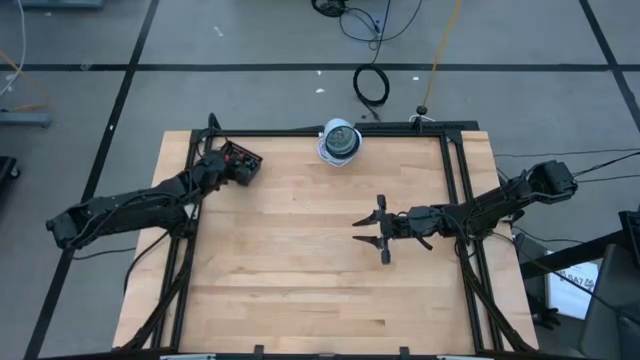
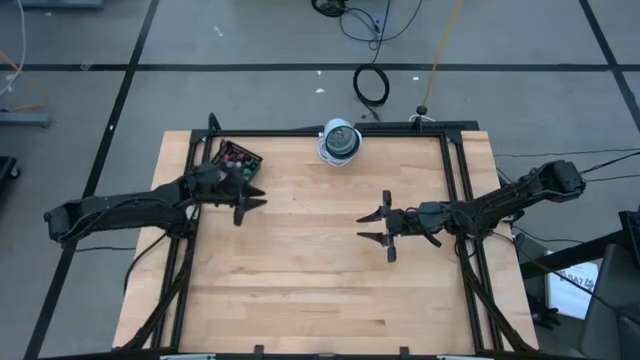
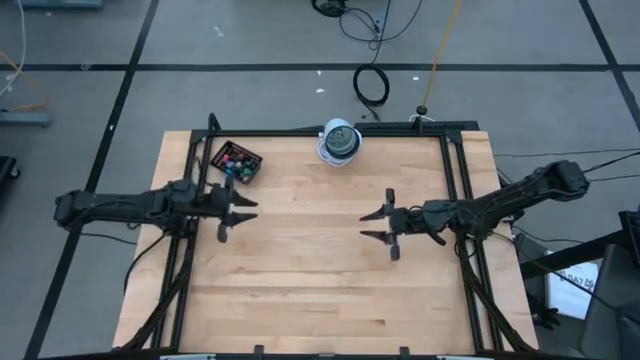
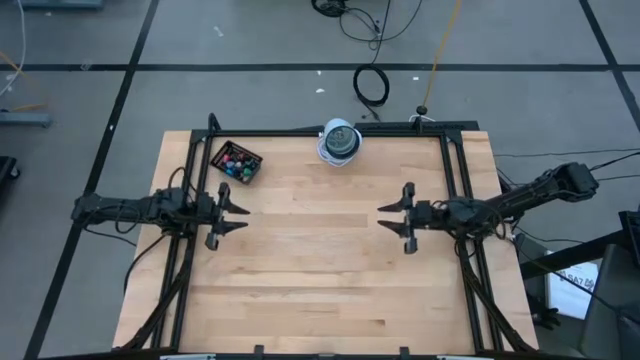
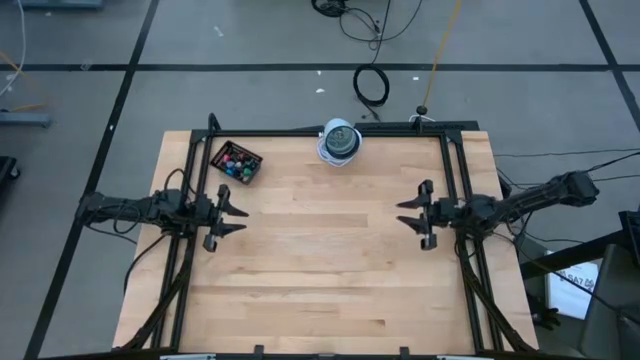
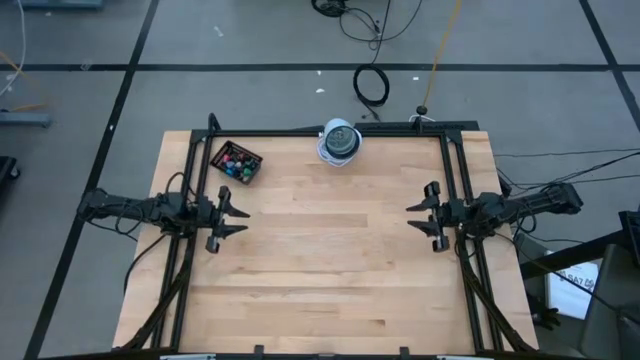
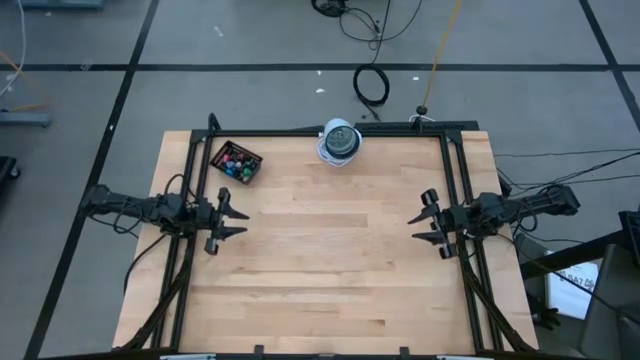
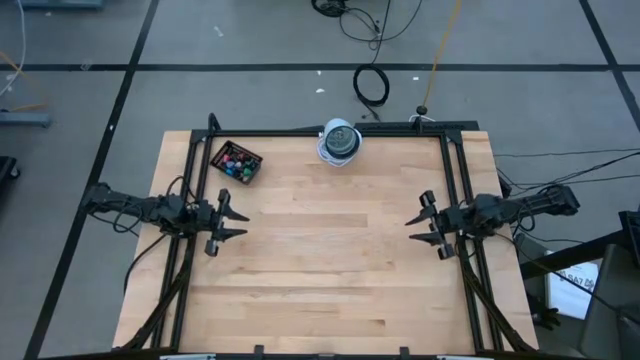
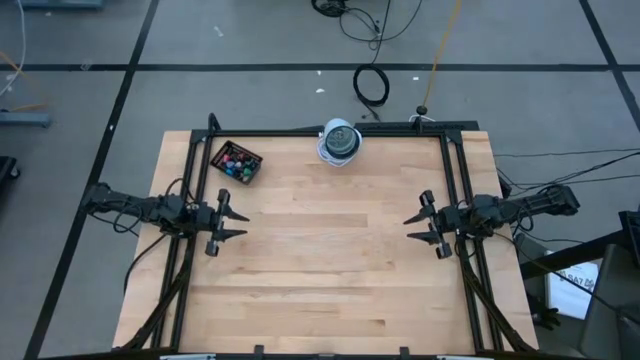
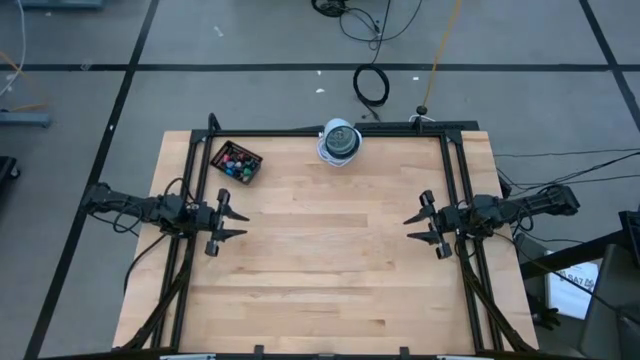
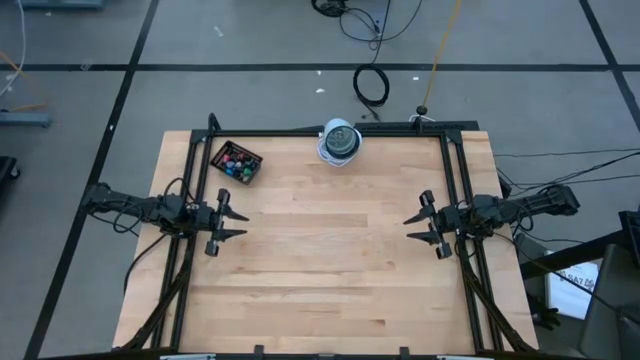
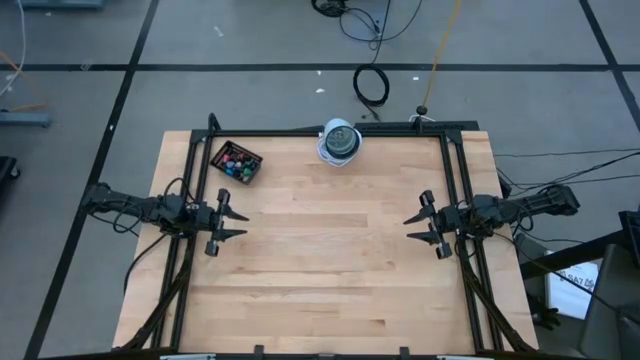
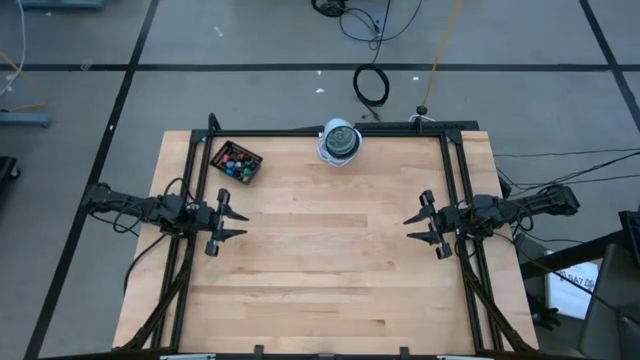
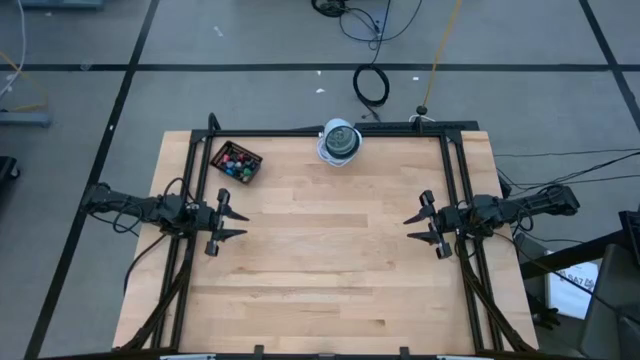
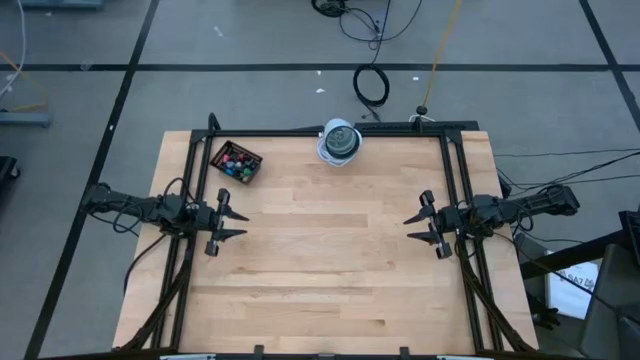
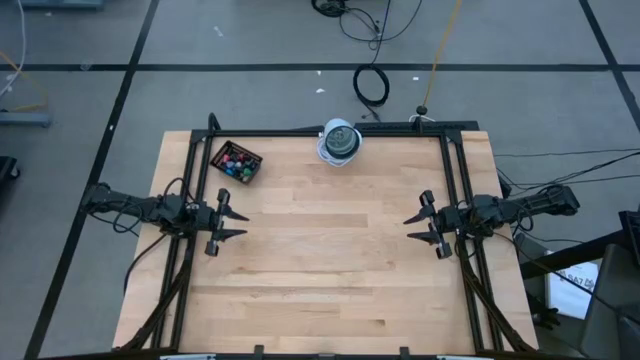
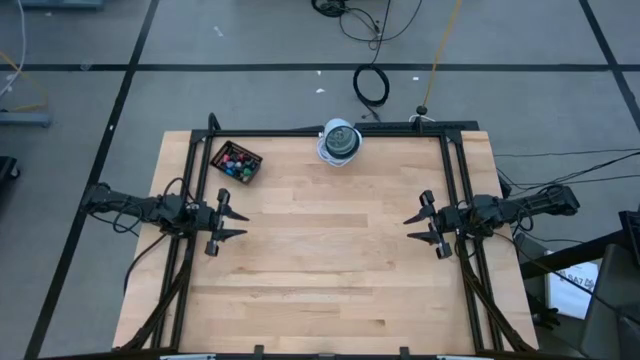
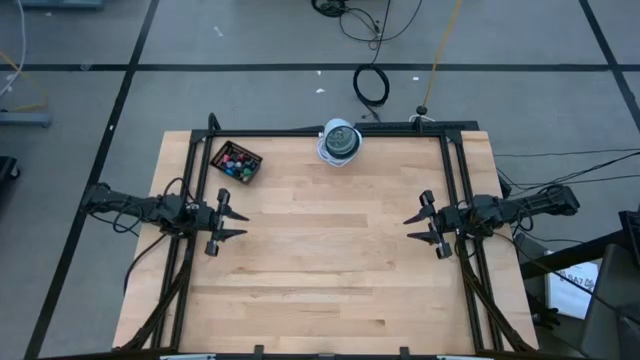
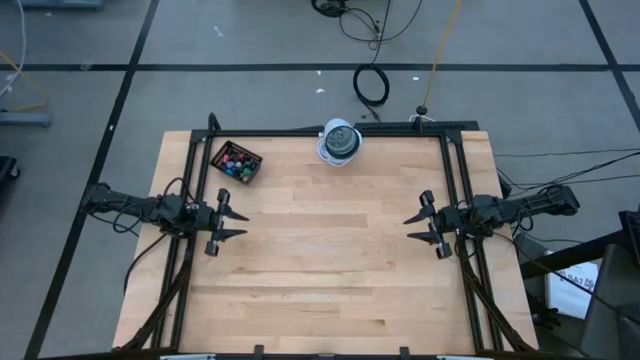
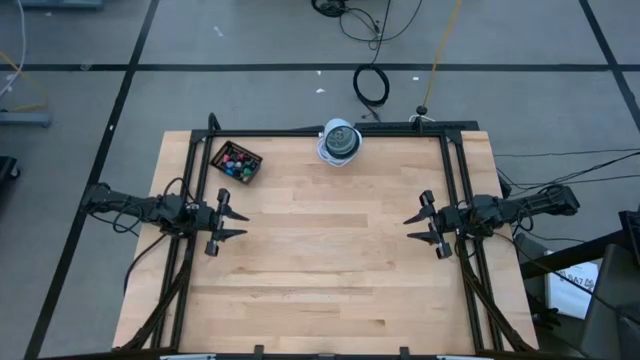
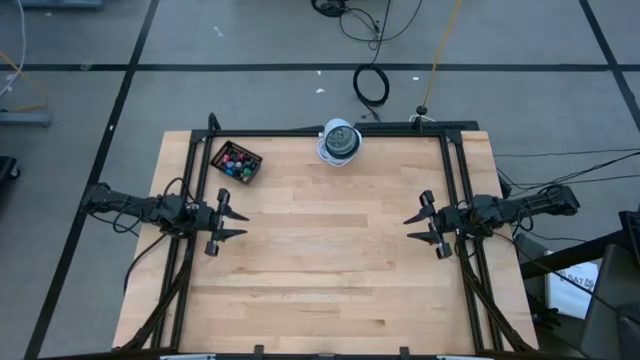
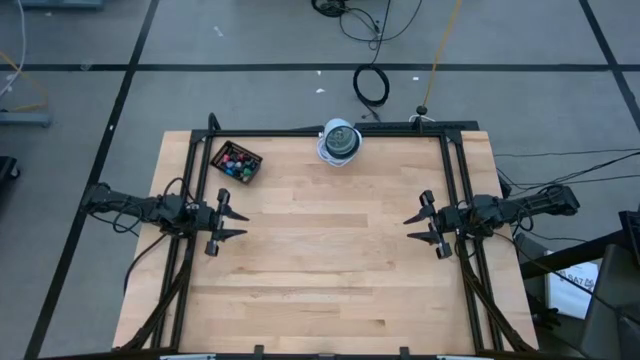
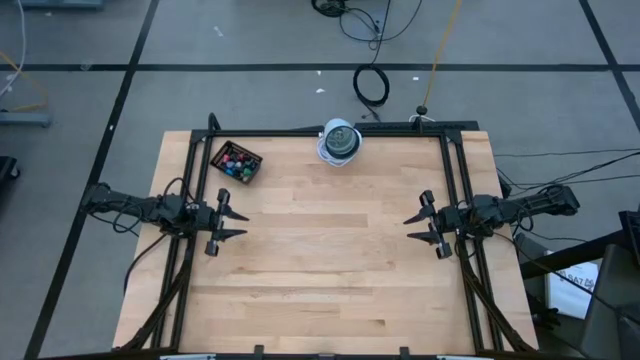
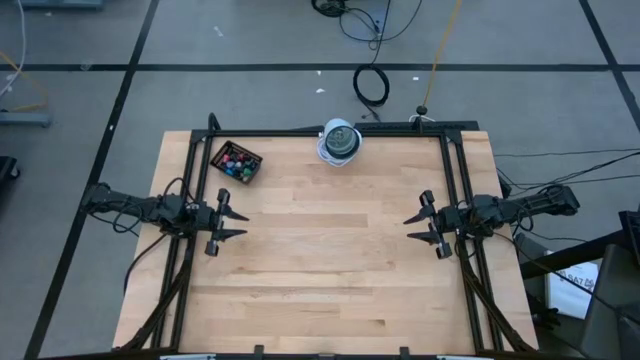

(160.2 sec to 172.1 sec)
Task: Pick & Place Nail Polish
Return to Home Position

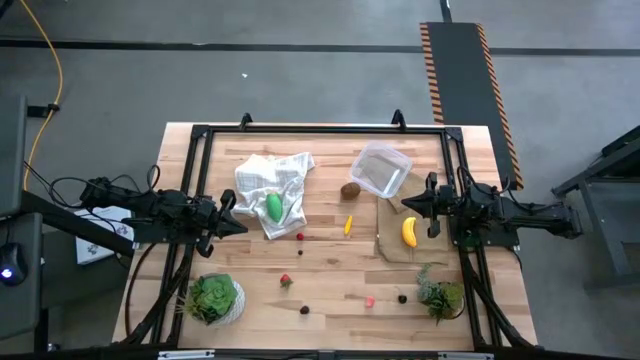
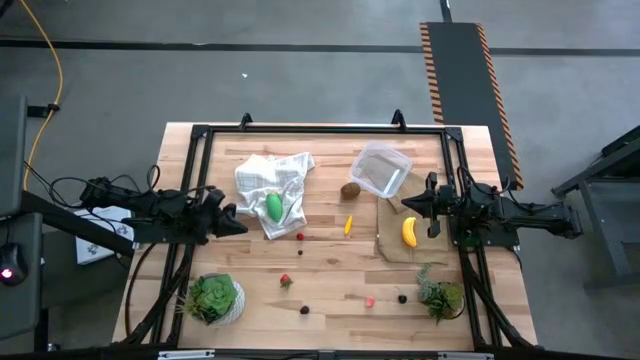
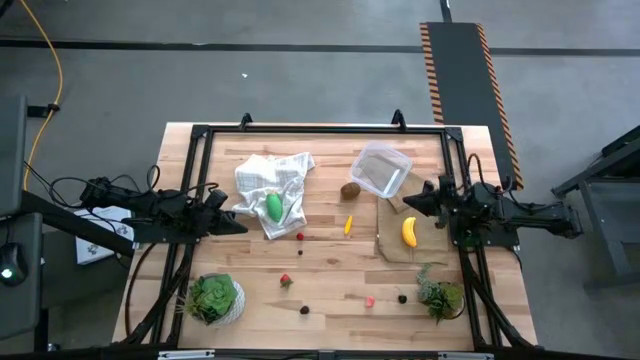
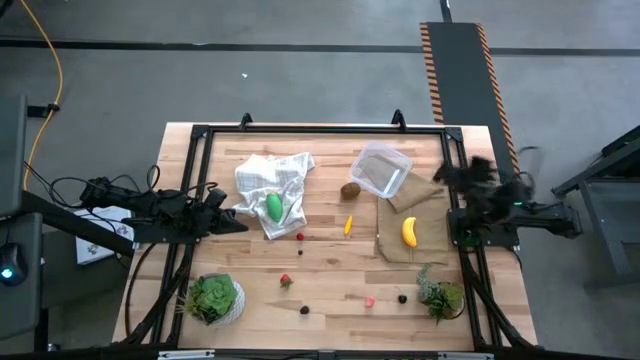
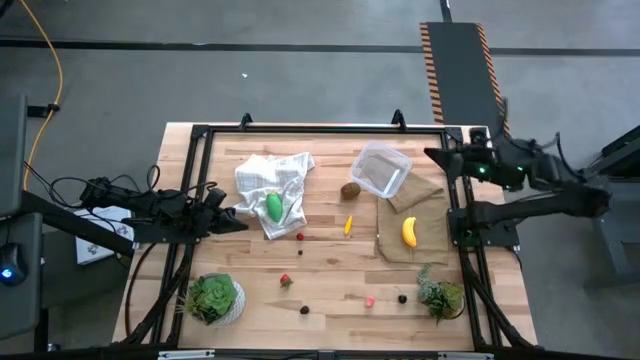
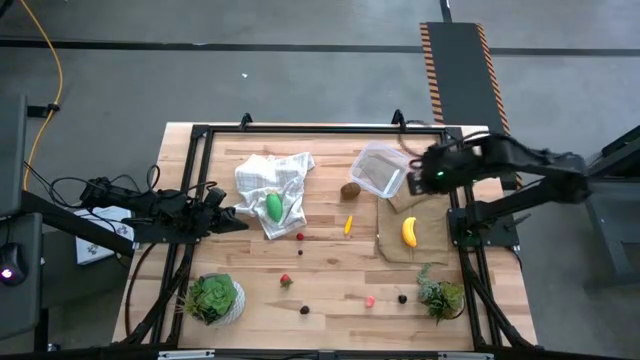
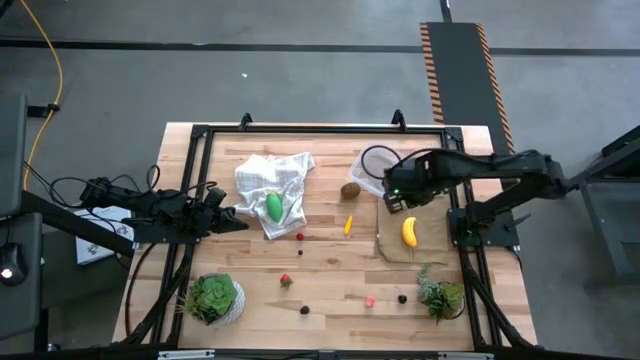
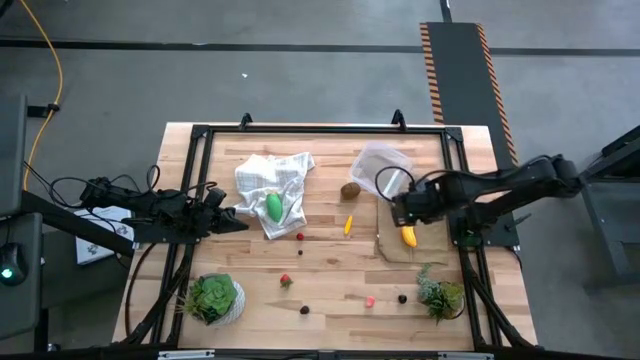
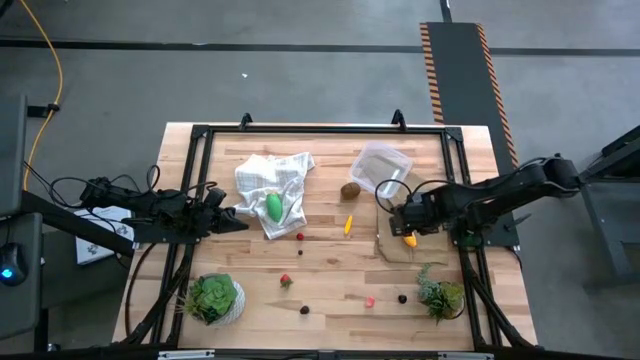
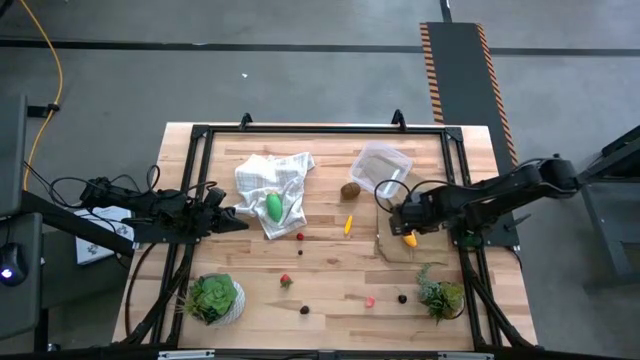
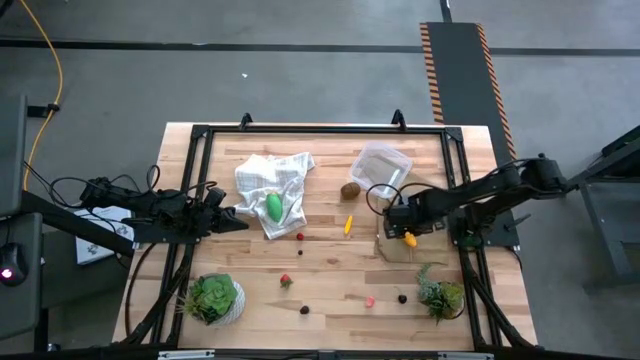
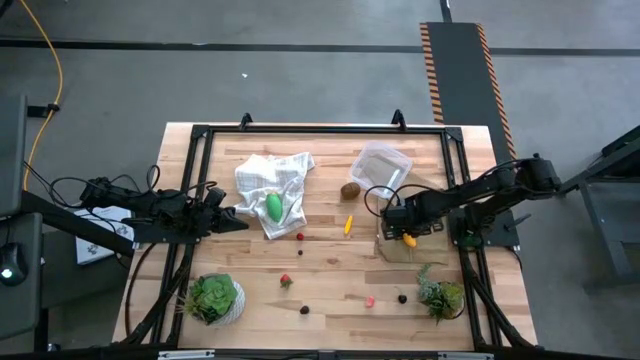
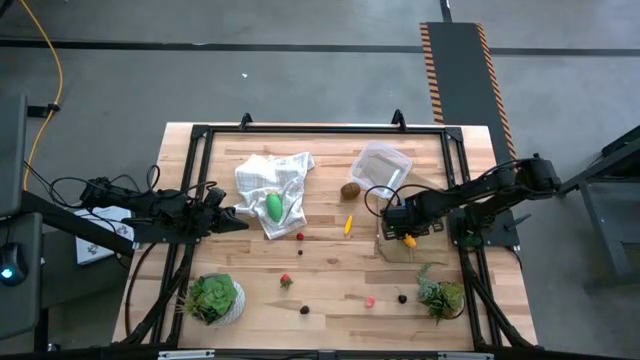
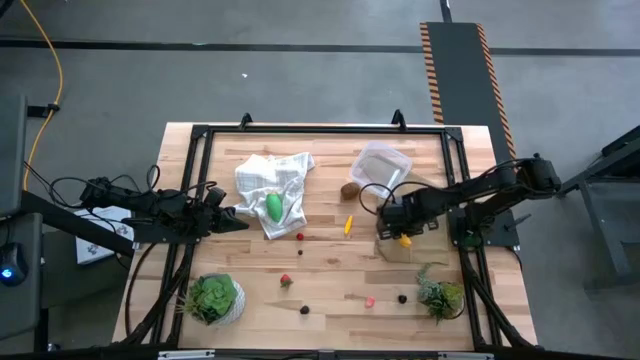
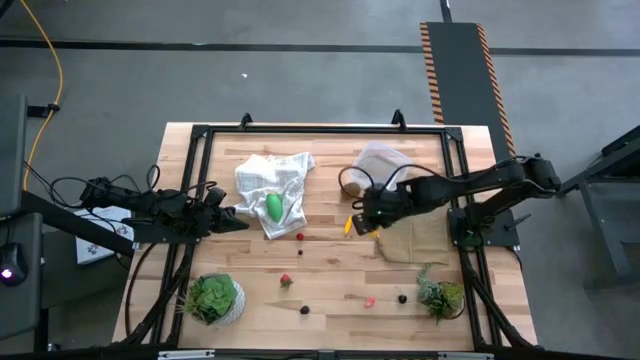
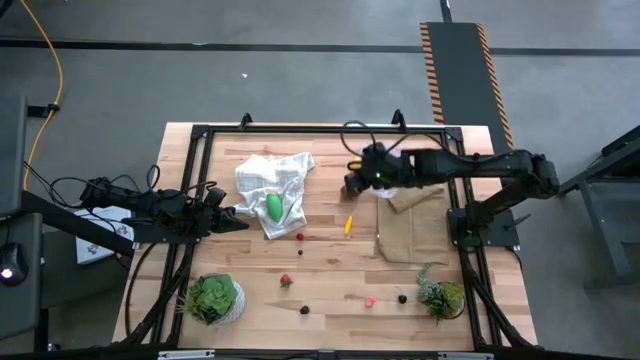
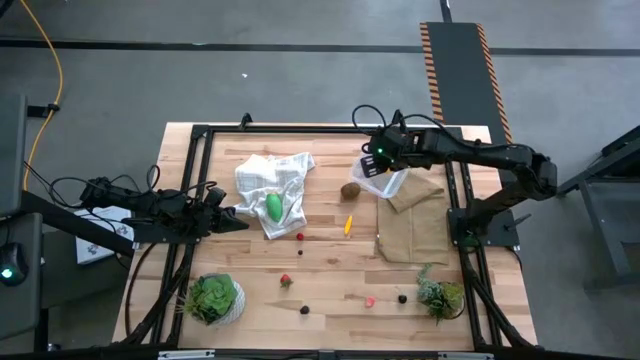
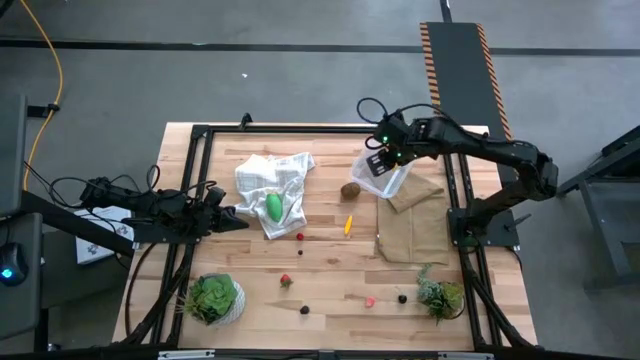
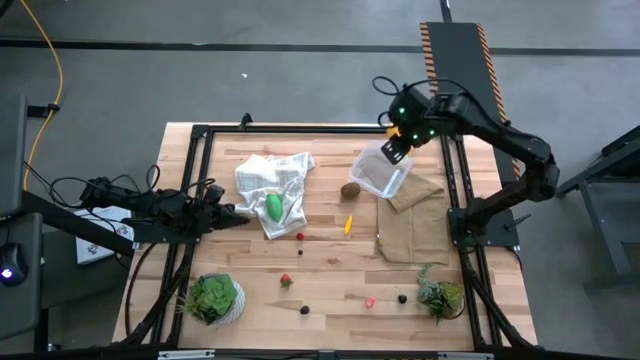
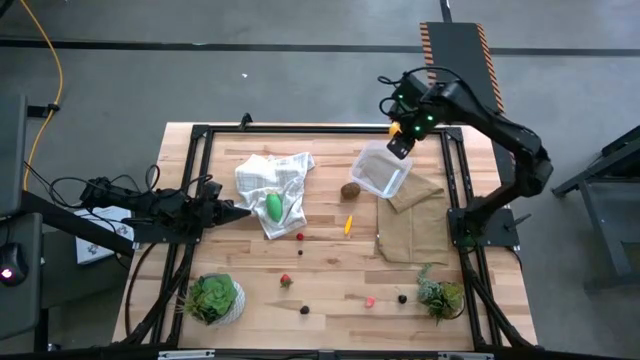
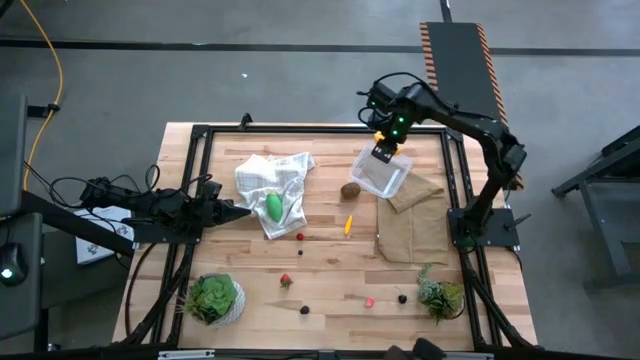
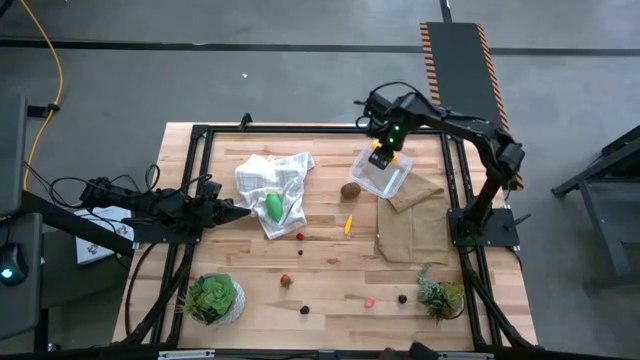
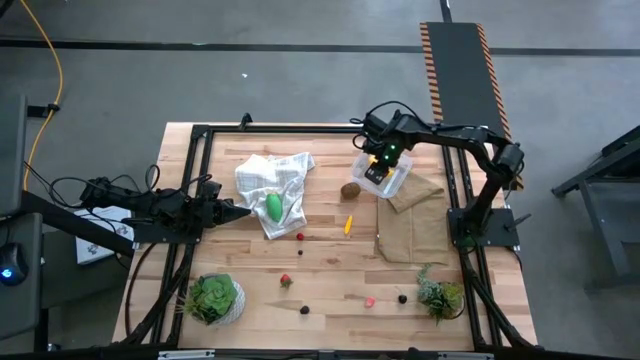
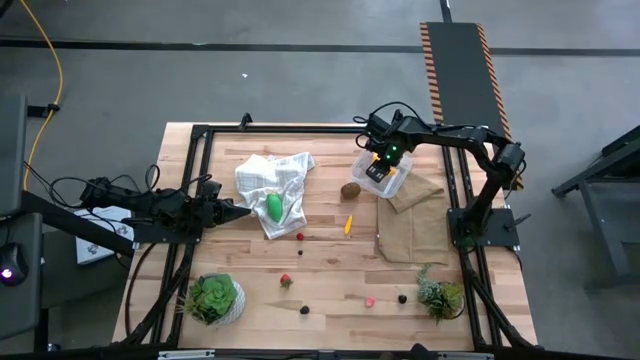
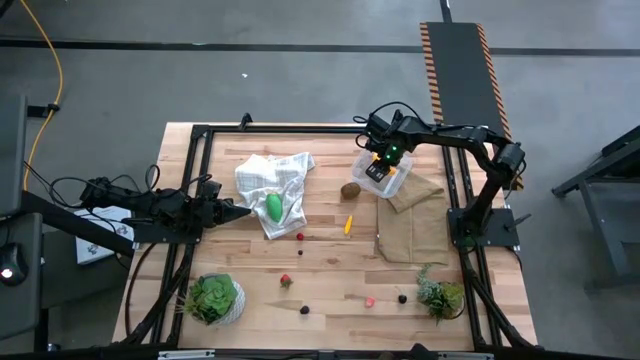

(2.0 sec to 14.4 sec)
Task: Pick and placing Produce into tupperware
Put the yellow banana into the transparent bin
